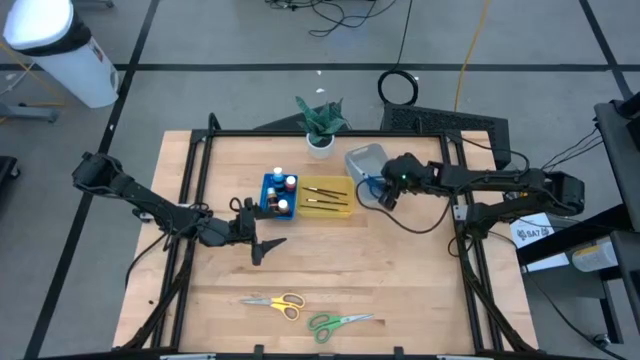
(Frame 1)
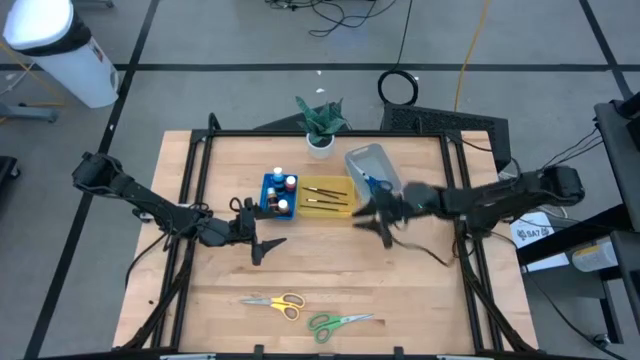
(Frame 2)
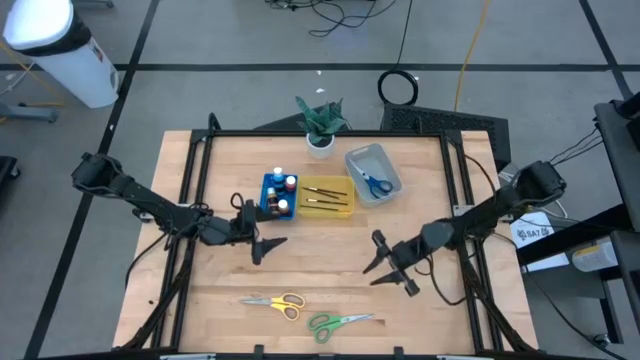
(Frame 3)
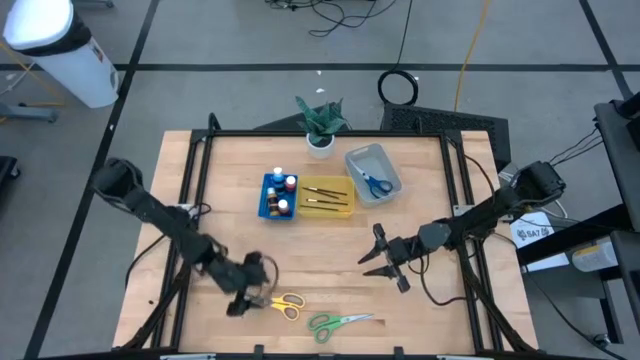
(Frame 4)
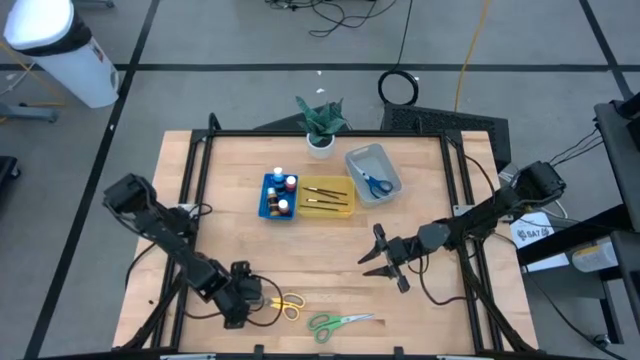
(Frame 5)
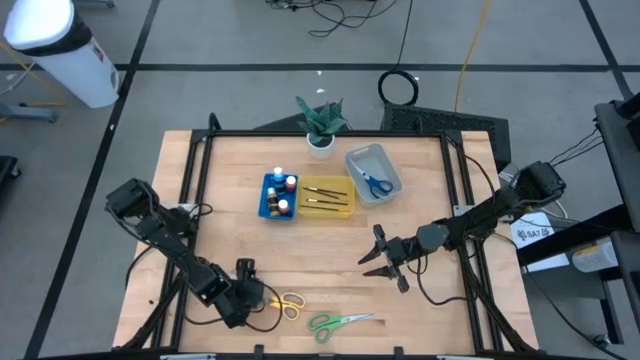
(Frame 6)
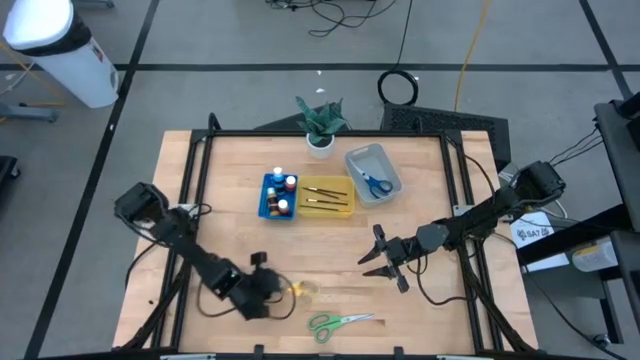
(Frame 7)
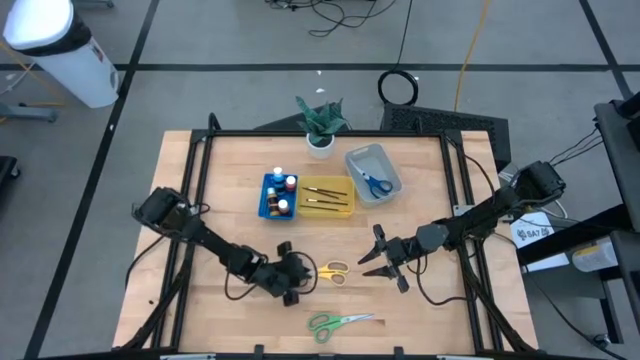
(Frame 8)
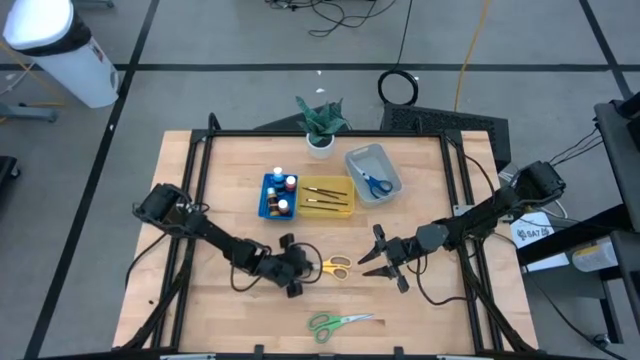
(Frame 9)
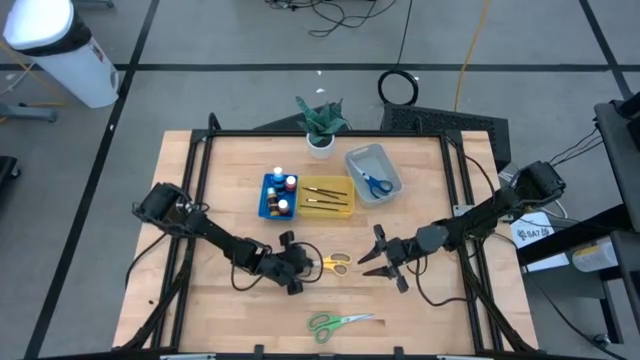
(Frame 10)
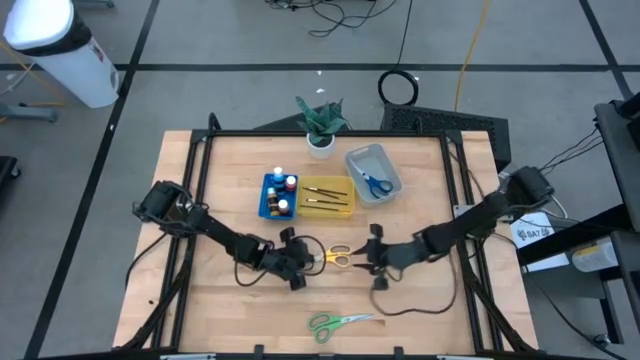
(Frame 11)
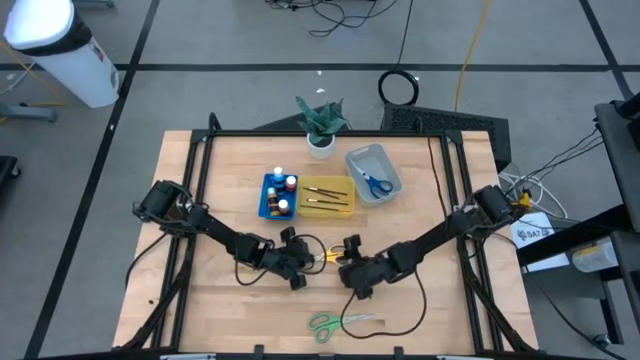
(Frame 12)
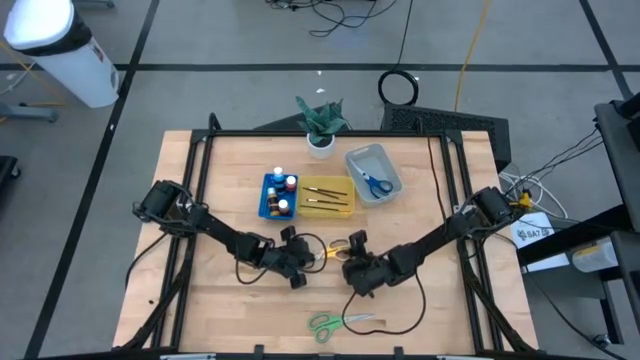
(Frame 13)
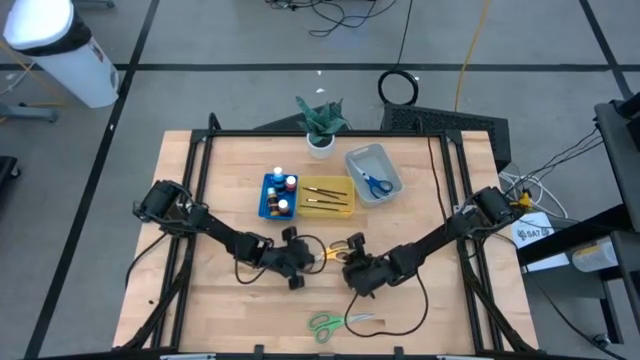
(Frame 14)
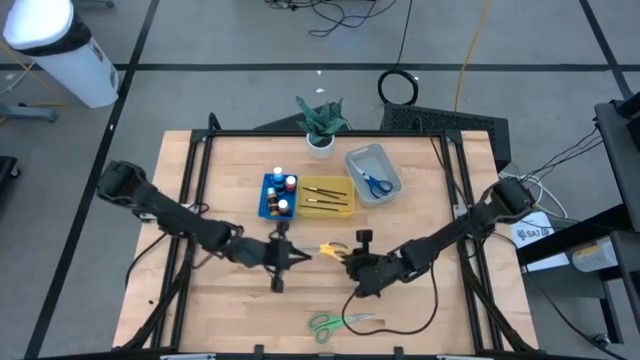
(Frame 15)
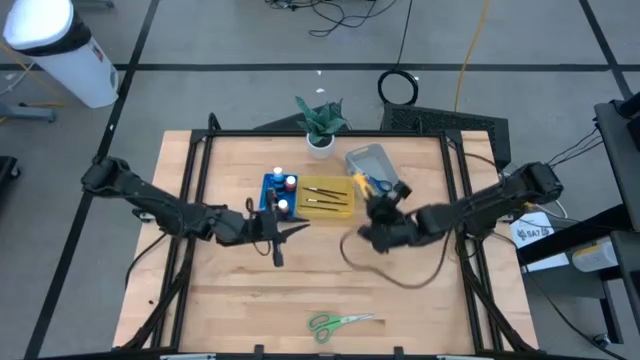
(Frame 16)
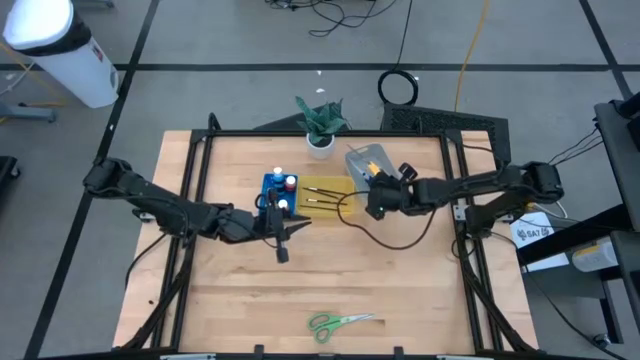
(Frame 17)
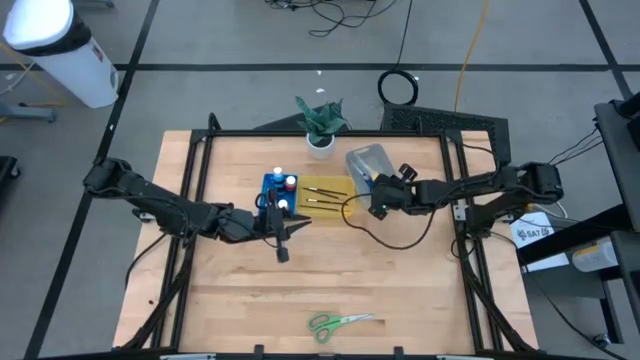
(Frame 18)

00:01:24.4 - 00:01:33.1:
Task: Pick & Place Paint Supplies
Put the yellow scissor into the gray bin

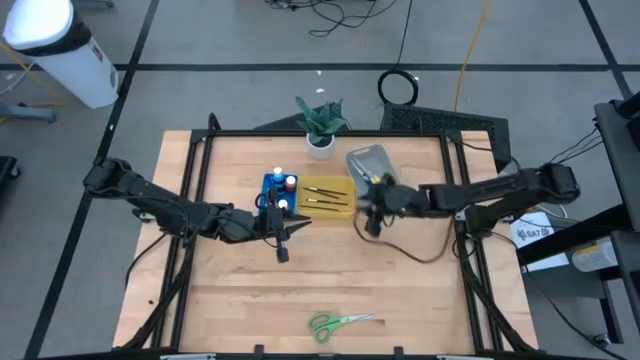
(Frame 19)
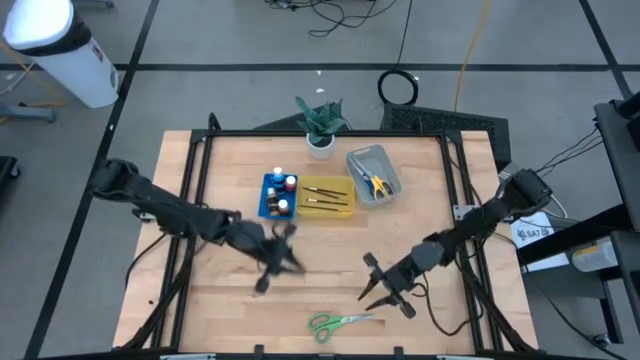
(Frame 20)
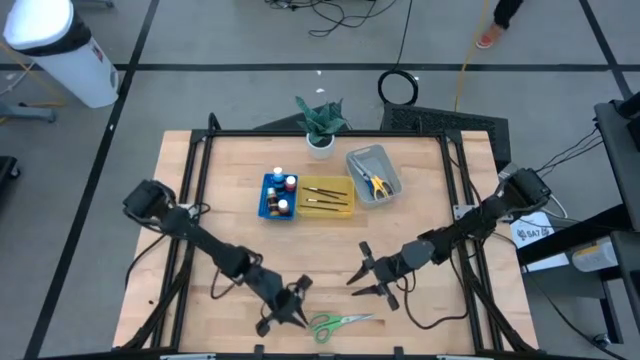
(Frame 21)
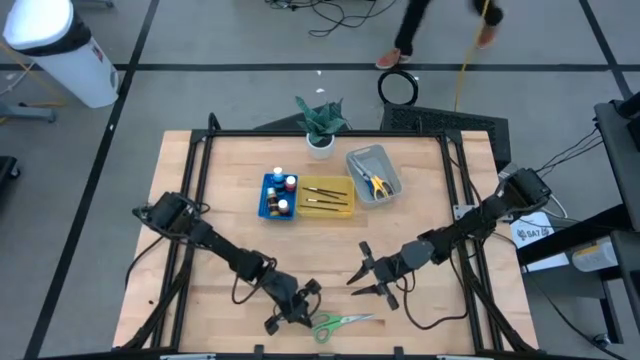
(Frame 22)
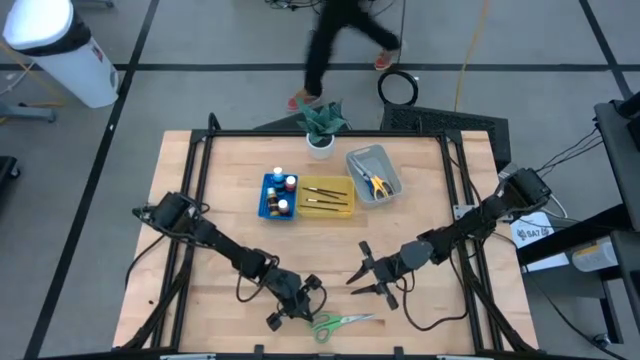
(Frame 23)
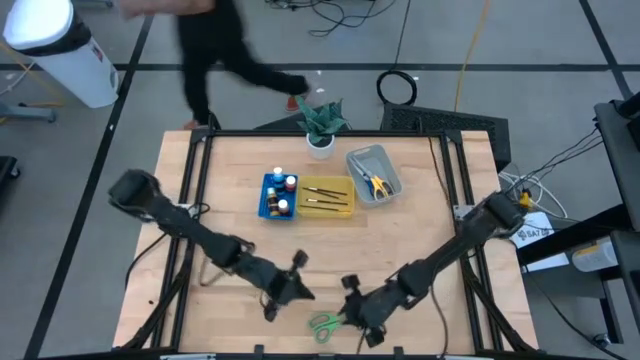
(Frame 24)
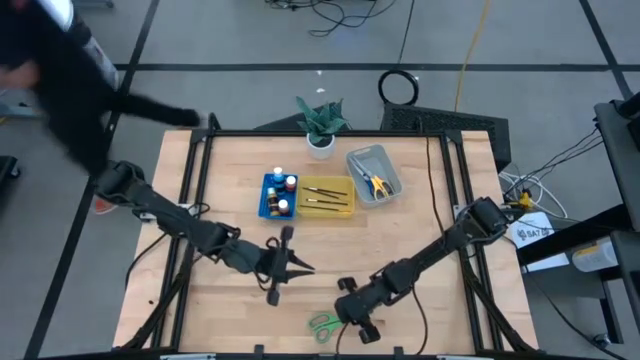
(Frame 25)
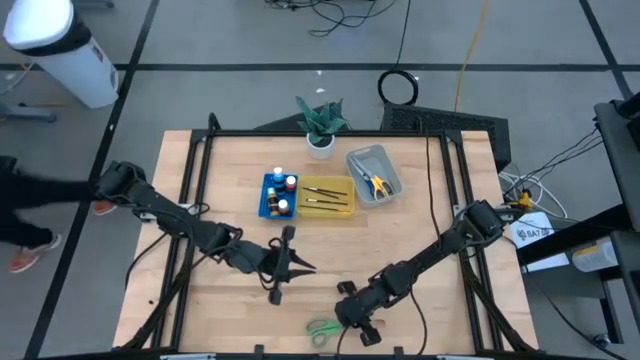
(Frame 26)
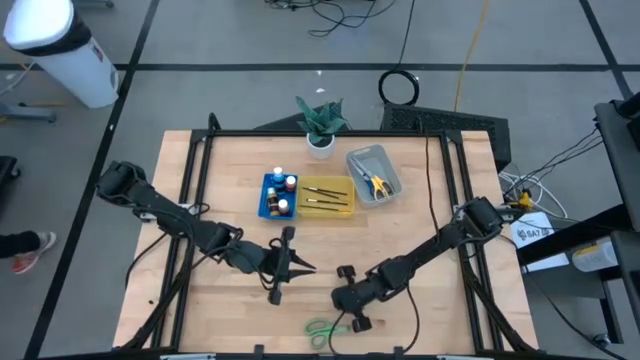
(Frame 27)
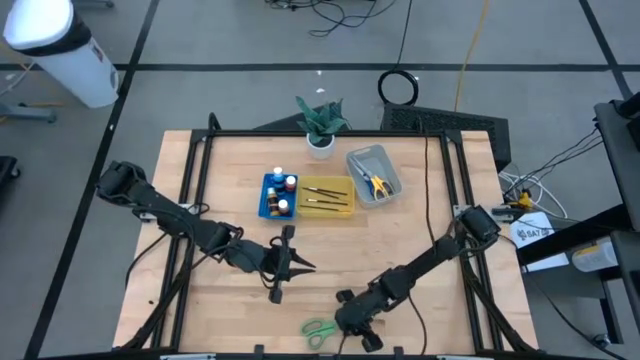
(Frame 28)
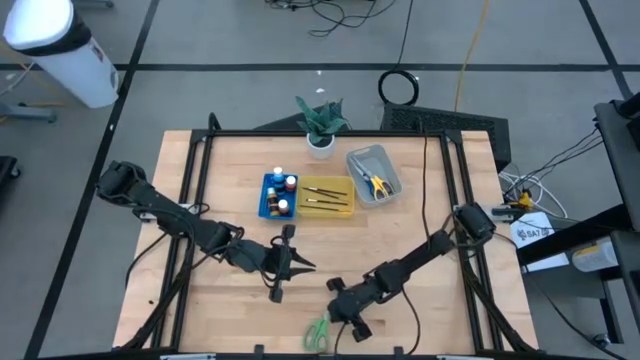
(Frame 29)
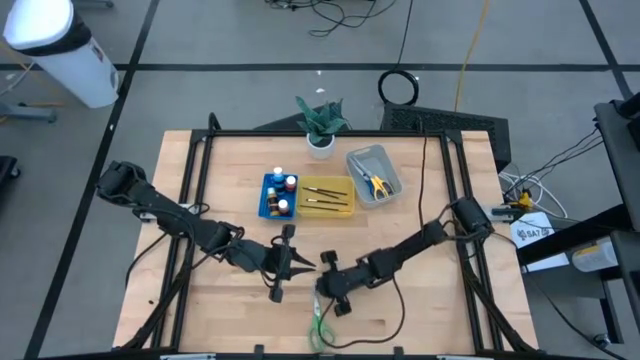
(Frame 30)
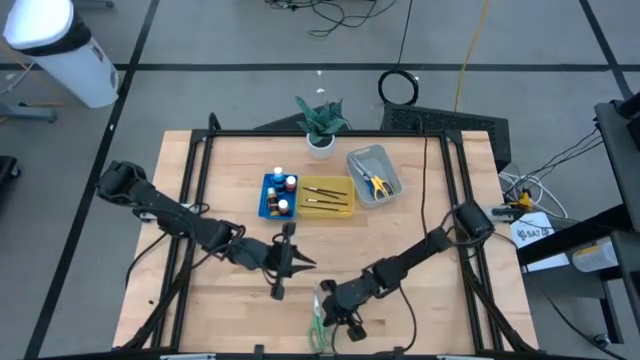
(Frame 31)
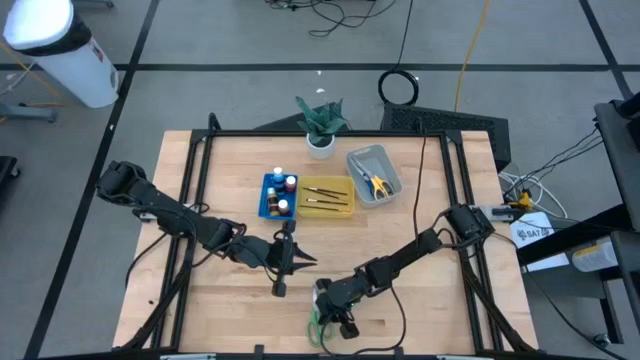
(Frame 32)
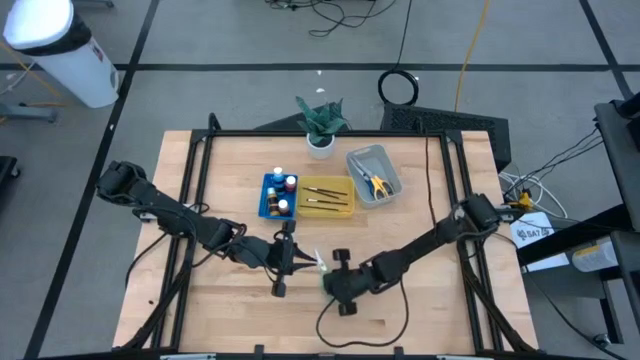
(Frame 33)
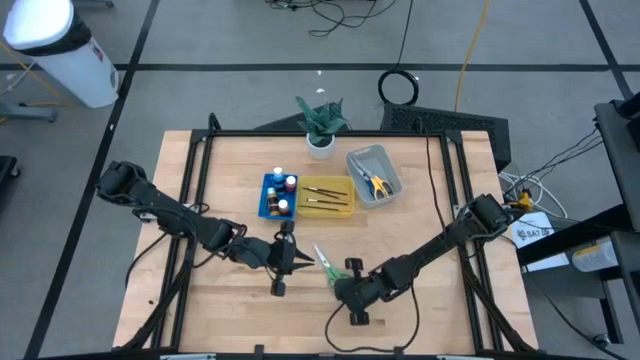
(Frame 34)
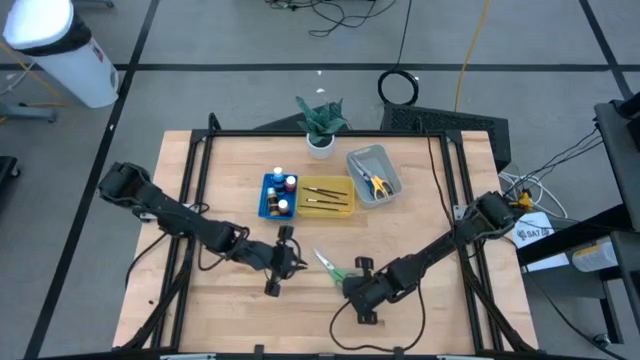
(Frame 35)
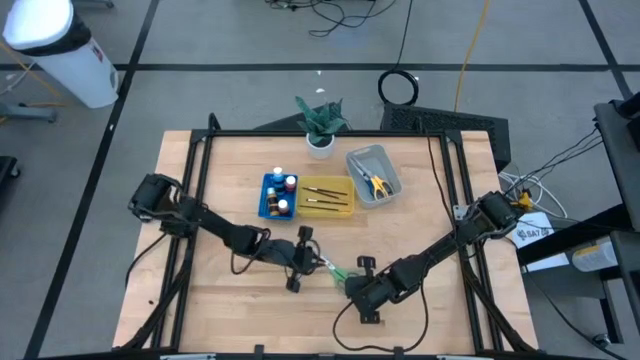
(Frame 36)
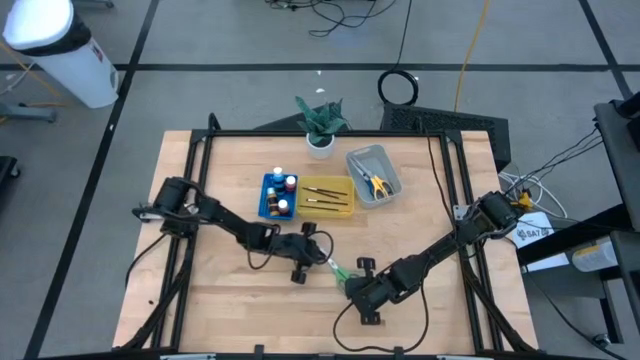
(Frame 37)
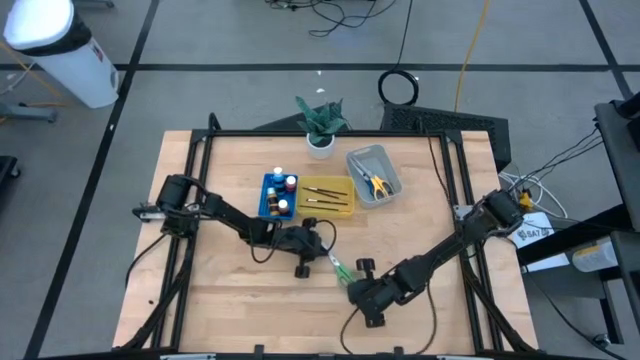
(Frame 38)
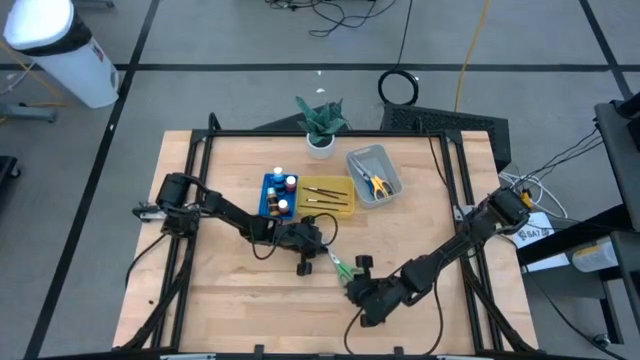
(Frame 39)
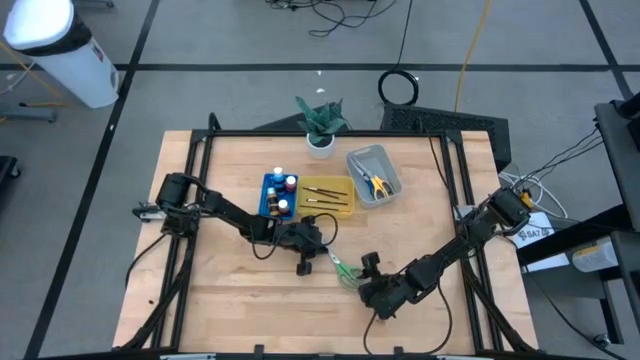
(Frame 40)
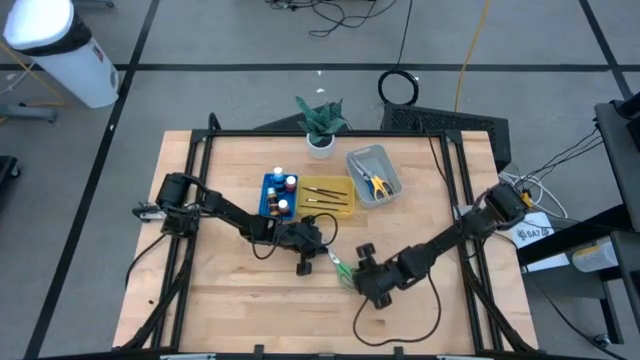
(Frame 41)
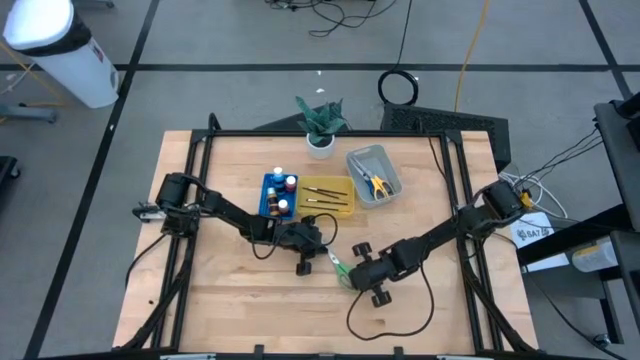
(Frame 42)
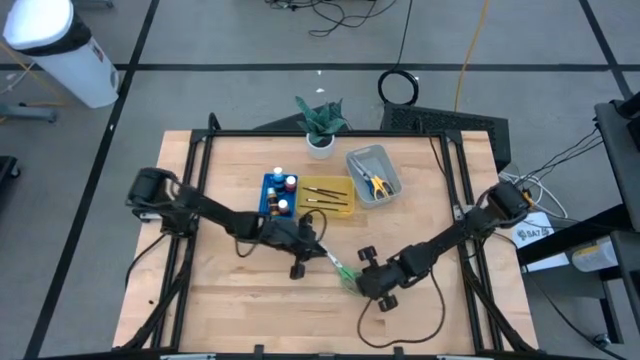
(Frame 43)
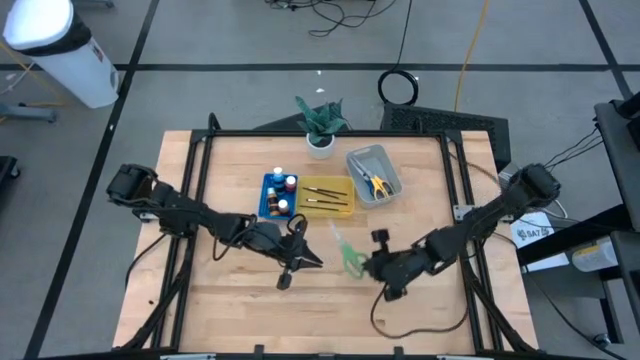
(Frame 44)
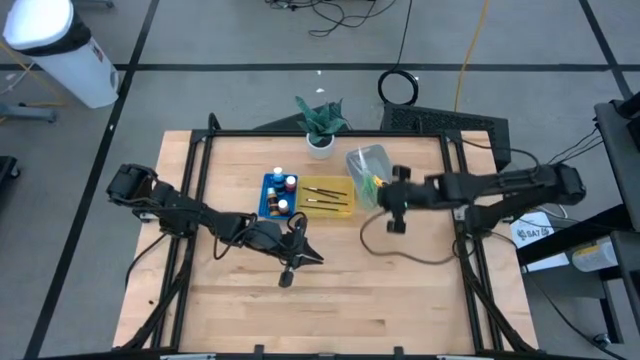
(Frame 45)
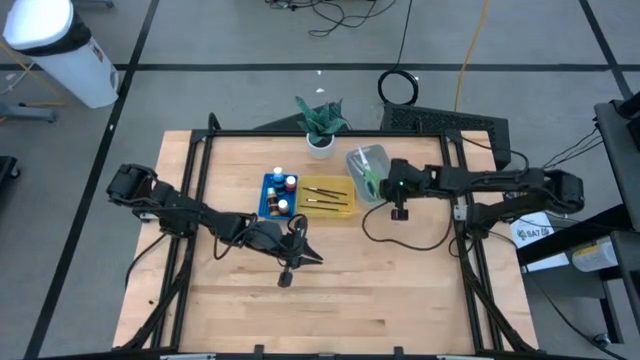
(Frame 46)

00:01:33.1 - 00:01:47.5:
Put the grey scissor into the gray bin
